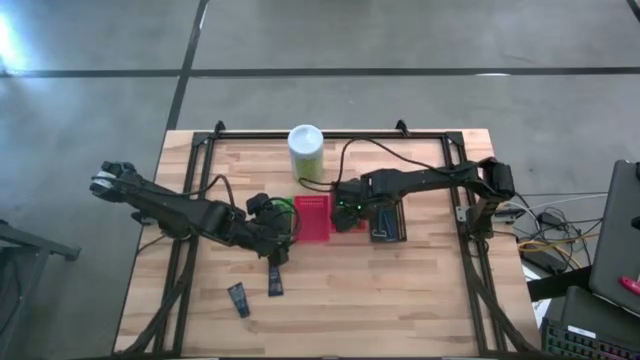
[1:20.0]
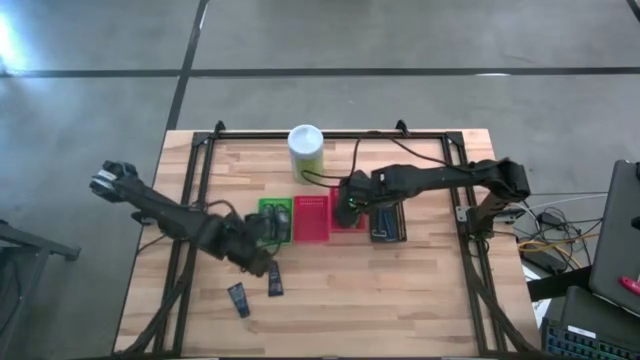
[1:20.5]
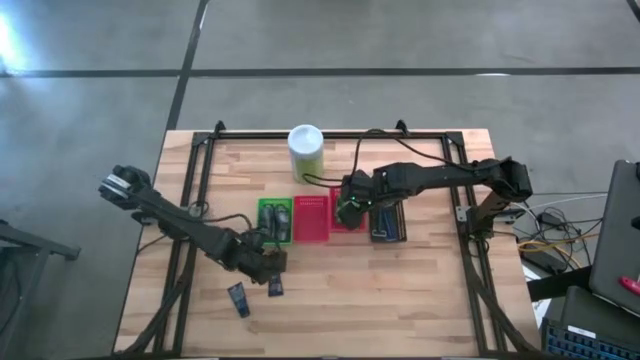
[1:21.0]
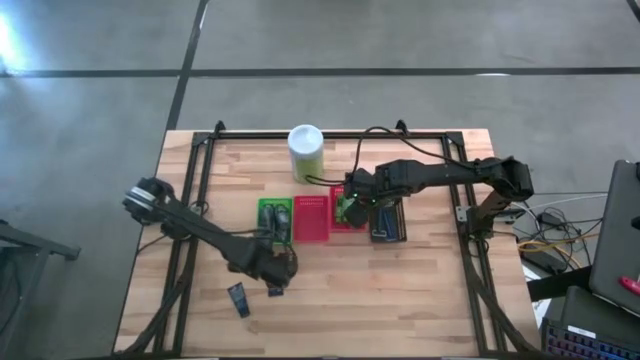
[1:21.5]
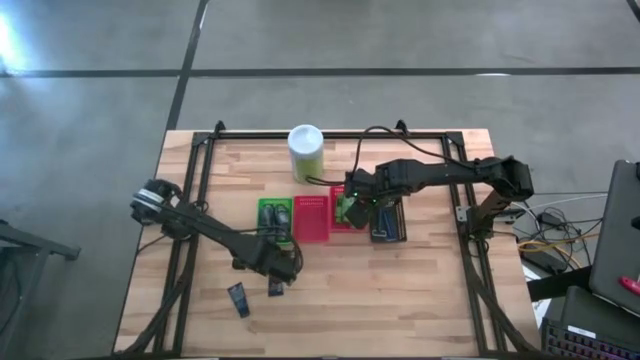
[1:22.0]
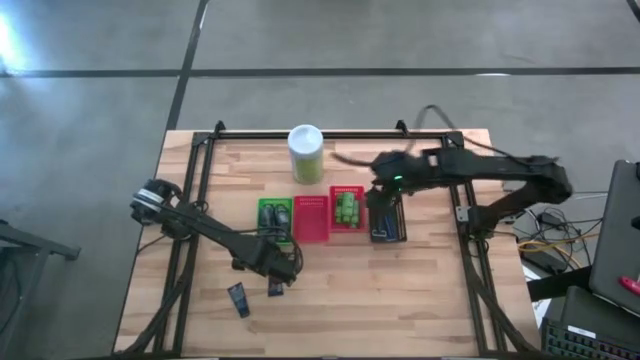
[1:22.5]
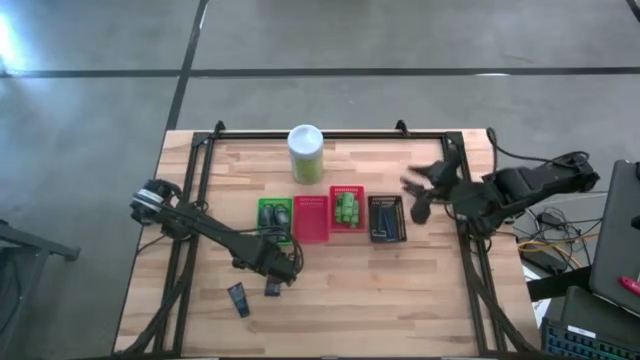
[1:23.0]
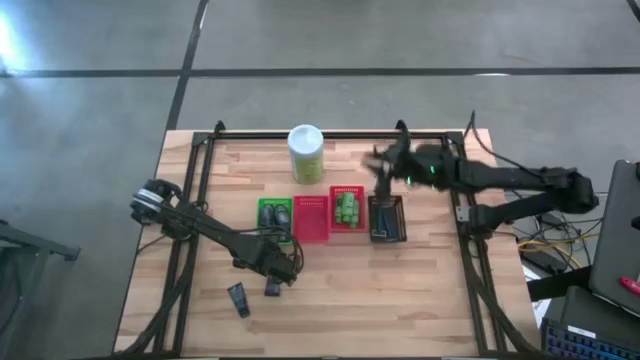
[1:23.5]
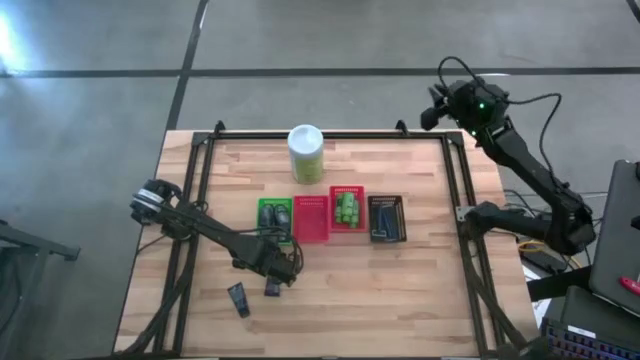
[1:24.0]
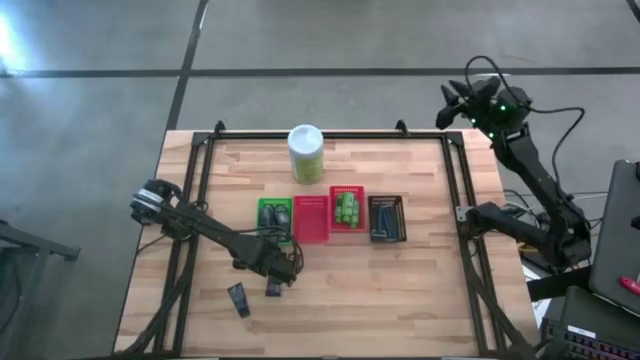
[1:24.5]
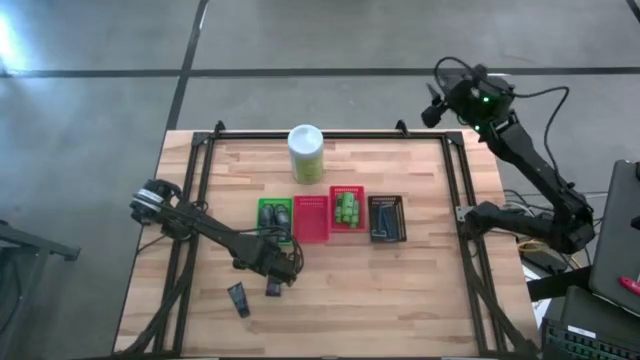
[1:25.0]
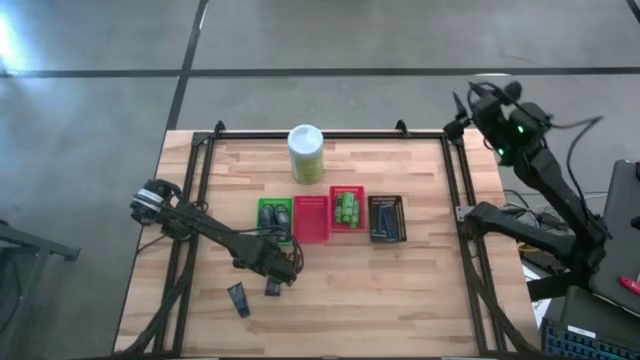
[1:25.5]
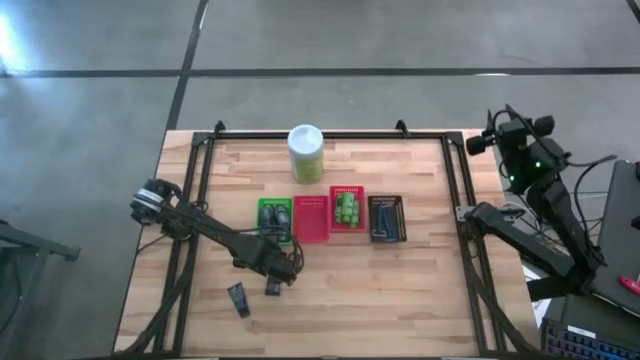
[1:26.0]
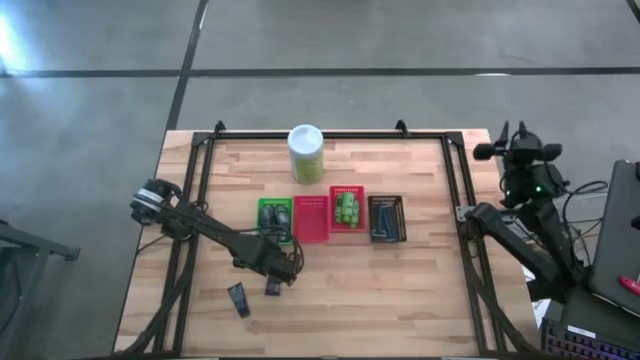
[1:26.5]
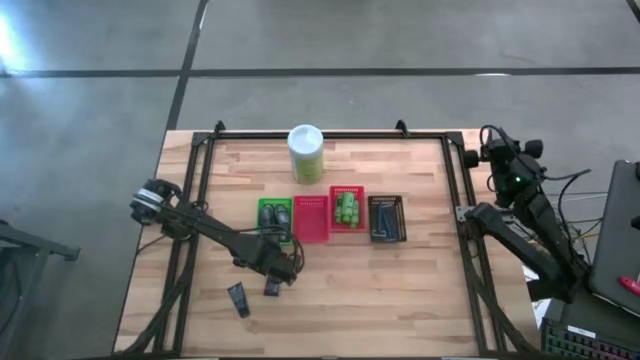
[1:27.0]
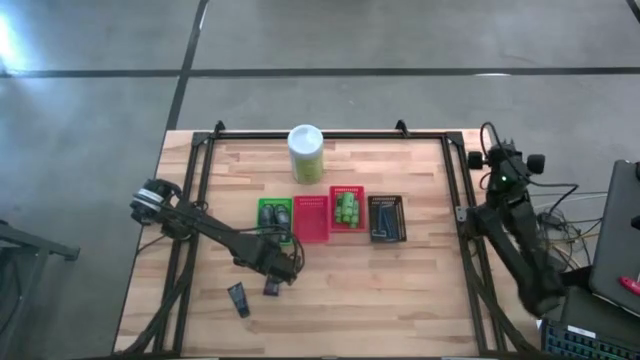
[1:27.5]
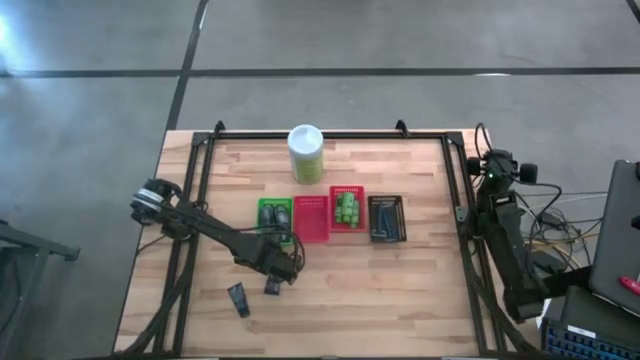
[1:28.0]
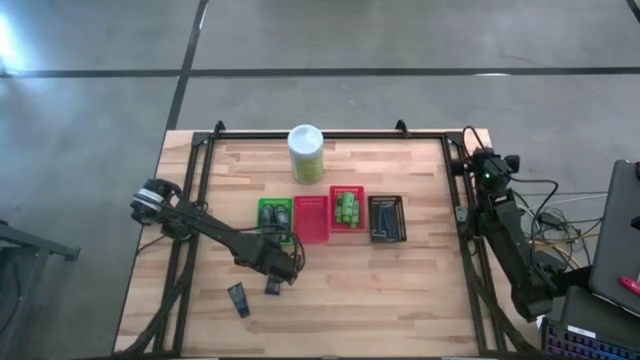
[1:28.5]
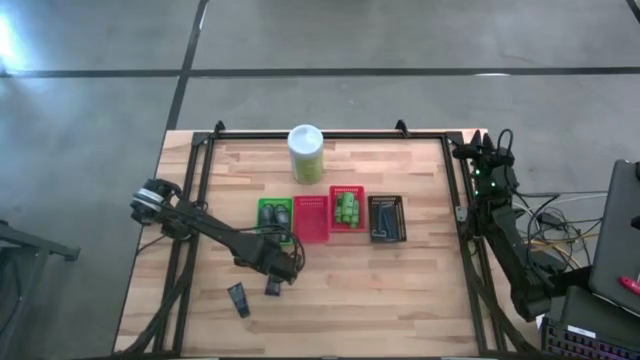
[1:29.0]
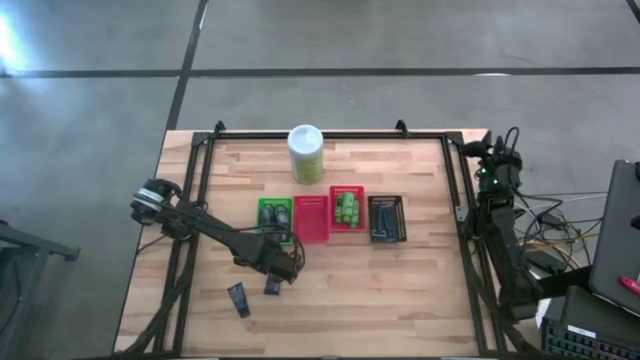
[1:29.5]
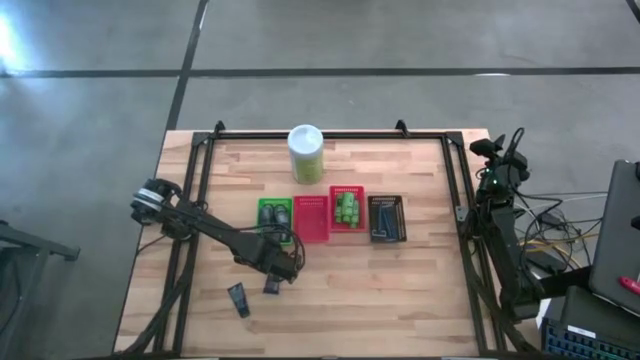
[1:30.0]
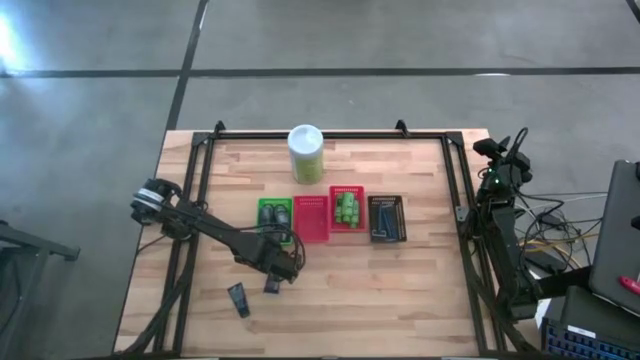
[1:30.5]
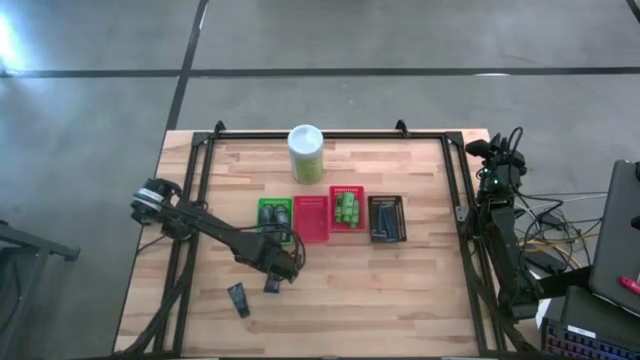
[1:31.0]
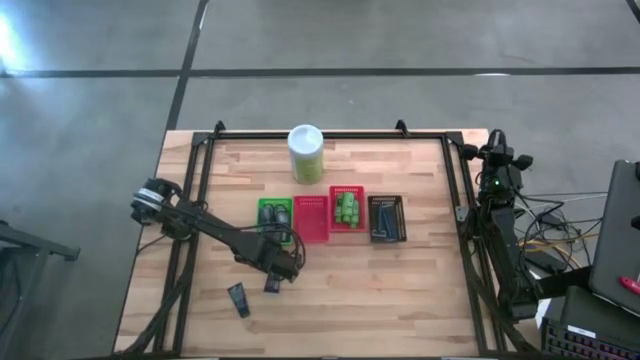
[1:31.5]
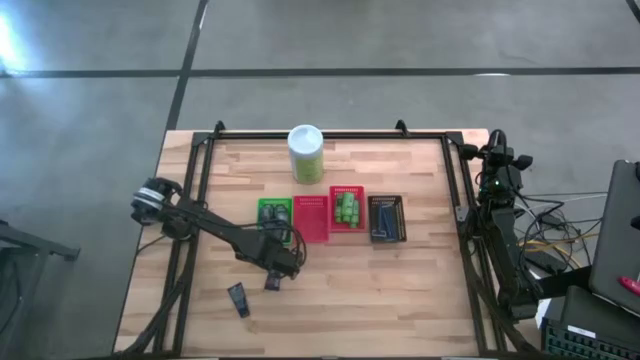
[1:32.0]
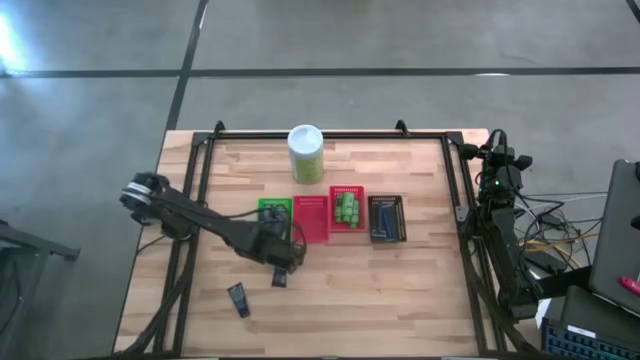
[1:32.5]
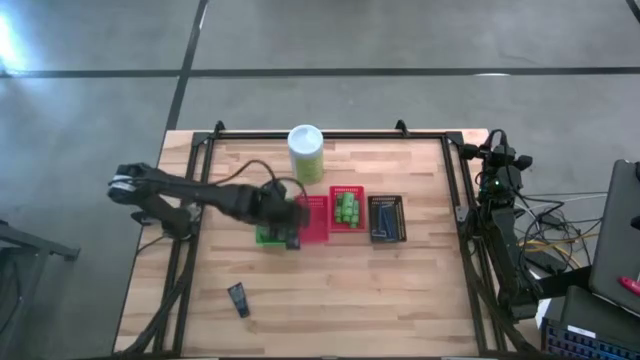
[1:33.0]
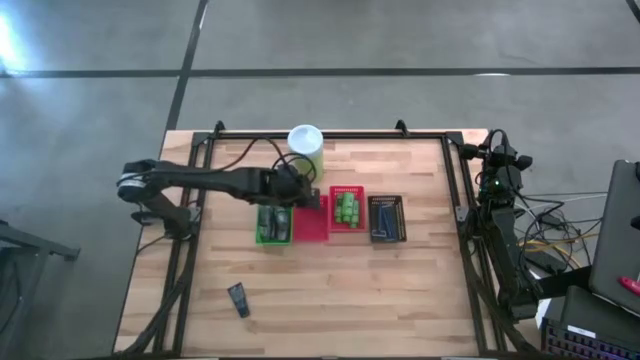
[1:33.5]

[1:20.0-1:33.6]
Task: Pick & Place Travel size toiletries
Put the blue shaving cream into the left red bin

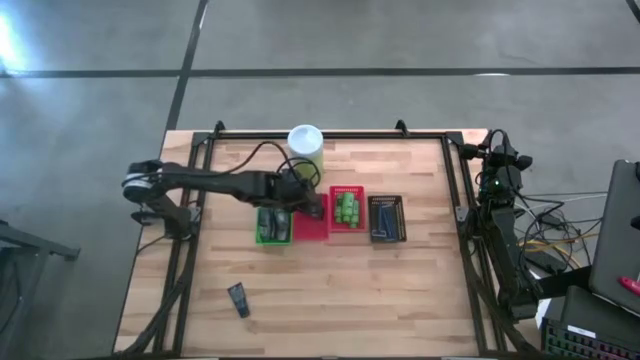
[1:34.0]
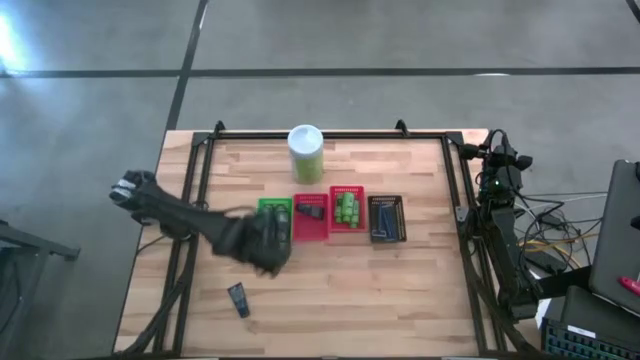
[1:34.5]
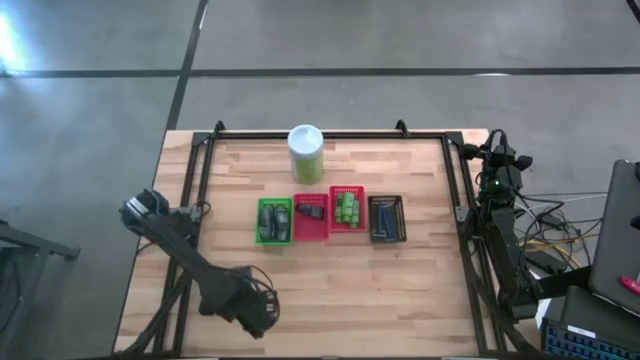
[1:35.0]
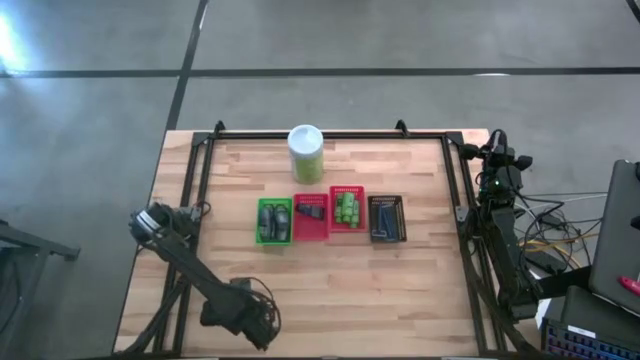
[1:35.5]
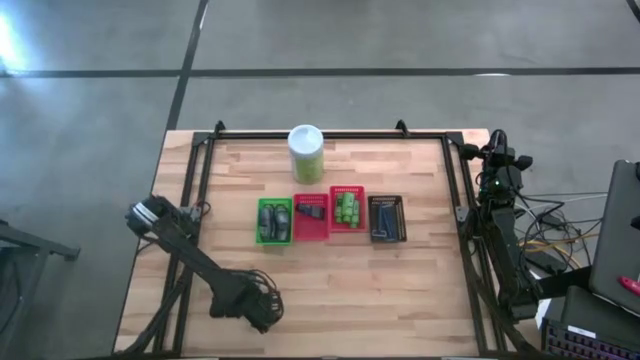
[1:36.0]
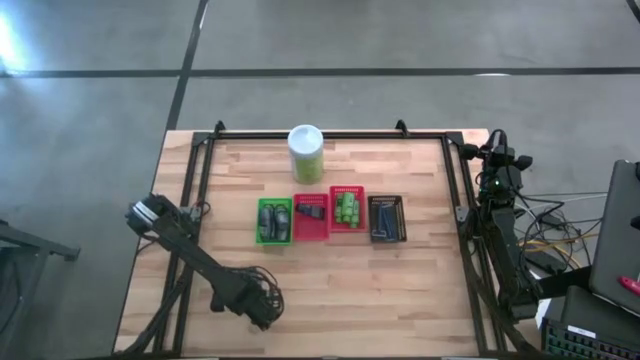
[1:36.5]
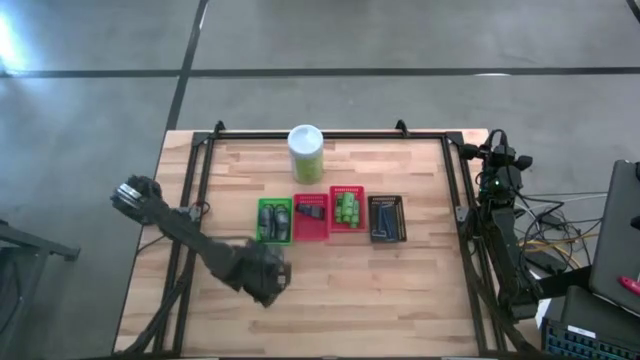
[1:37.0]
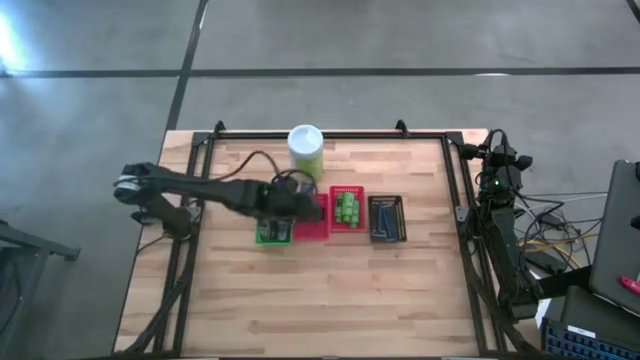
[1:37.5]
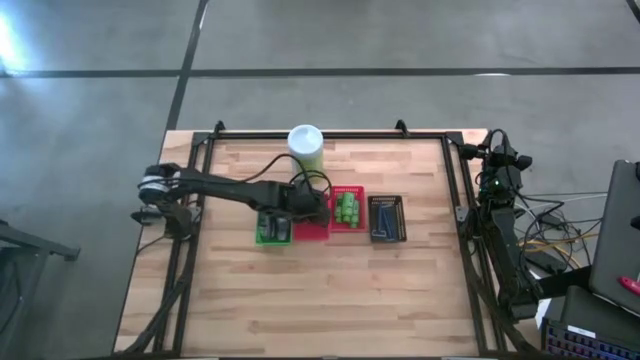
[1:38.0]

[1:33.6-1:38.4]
Put the blue shaving cream into the left red bin
